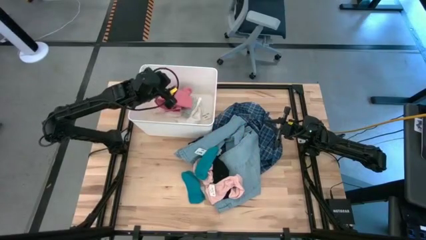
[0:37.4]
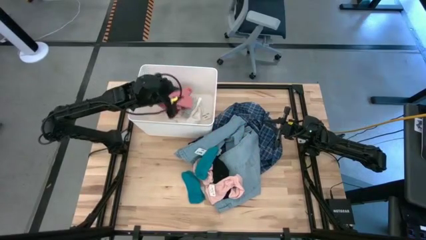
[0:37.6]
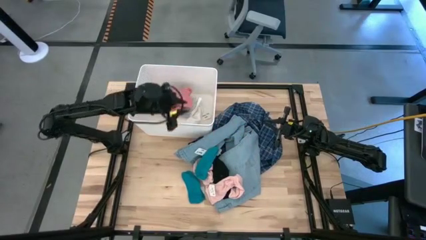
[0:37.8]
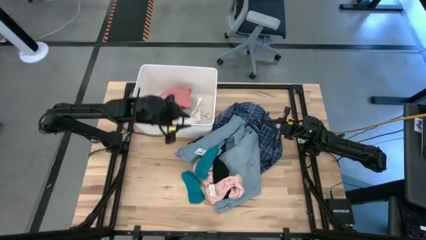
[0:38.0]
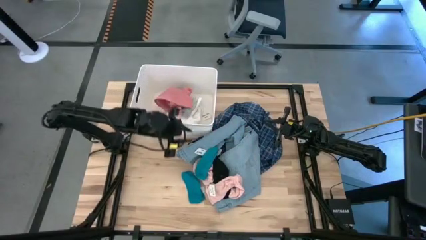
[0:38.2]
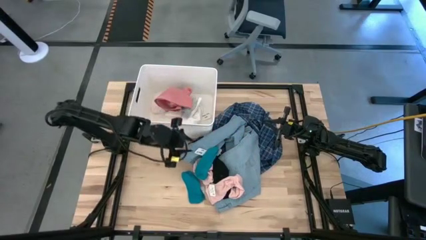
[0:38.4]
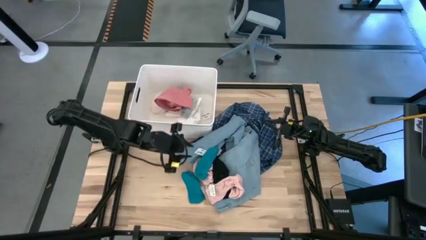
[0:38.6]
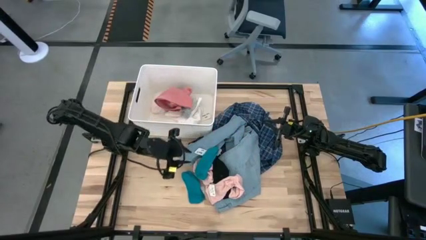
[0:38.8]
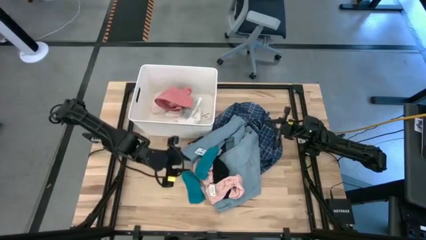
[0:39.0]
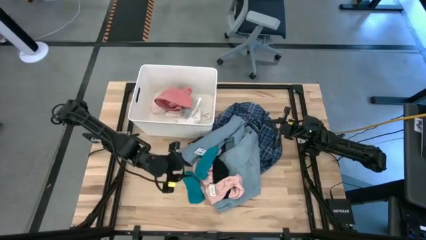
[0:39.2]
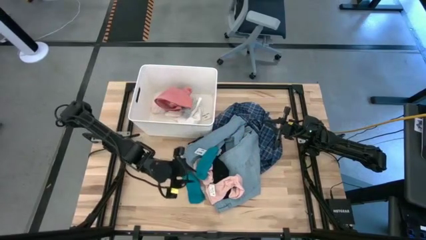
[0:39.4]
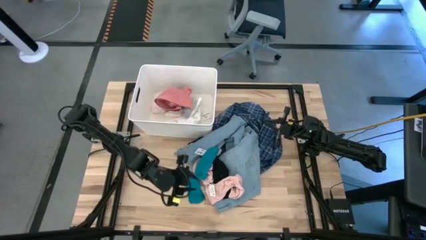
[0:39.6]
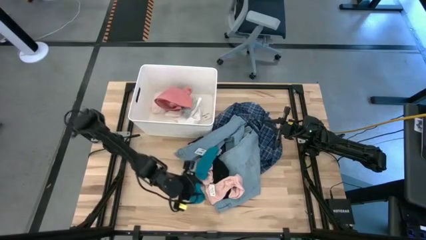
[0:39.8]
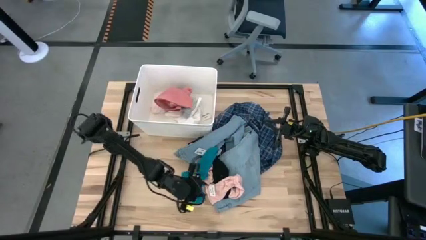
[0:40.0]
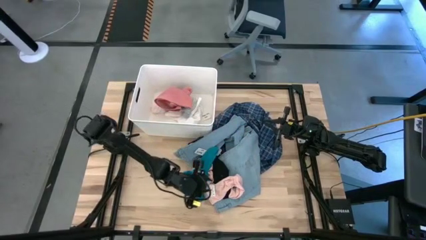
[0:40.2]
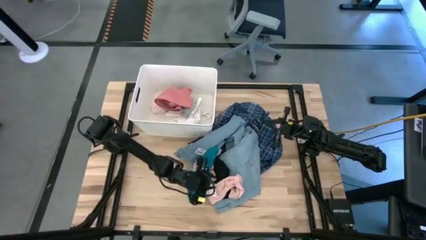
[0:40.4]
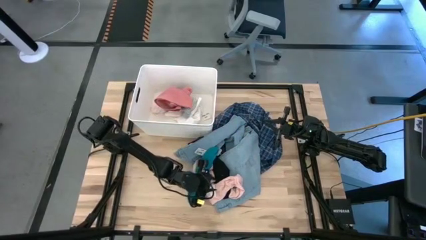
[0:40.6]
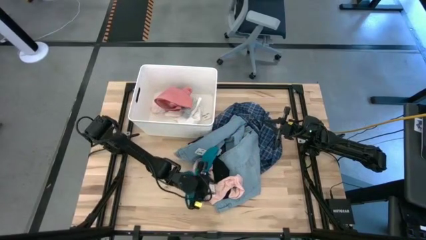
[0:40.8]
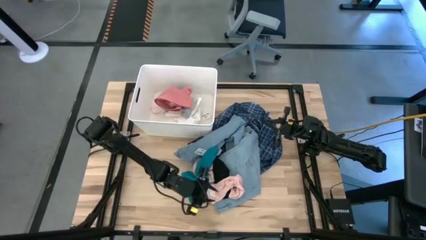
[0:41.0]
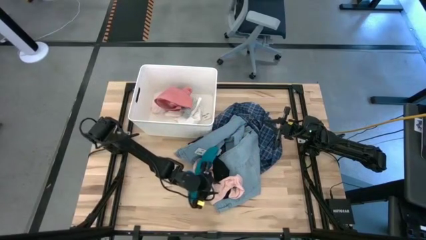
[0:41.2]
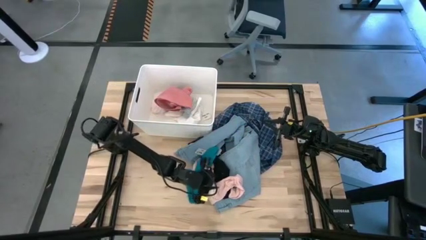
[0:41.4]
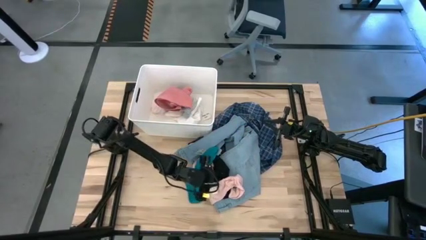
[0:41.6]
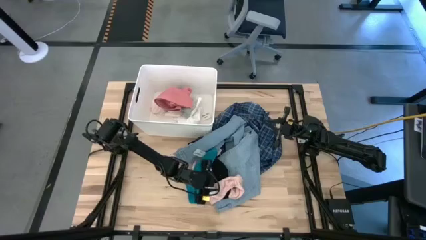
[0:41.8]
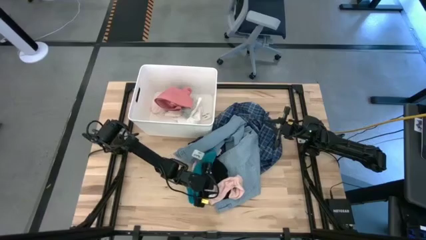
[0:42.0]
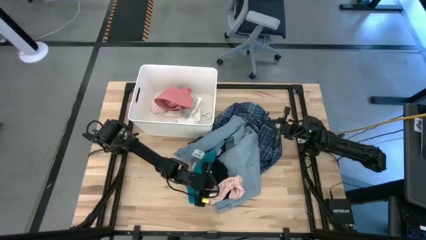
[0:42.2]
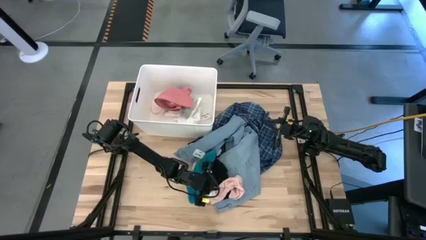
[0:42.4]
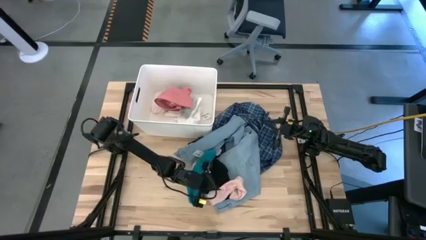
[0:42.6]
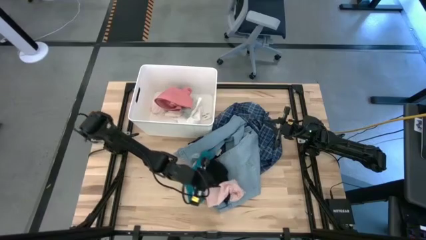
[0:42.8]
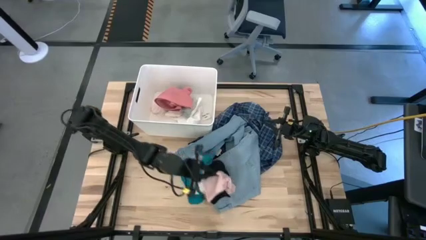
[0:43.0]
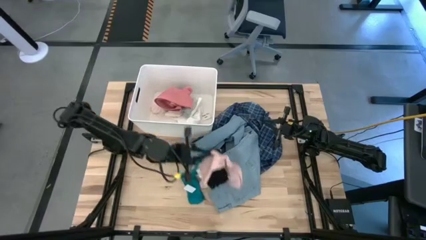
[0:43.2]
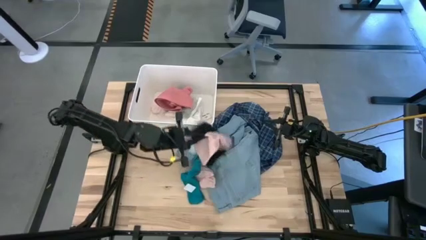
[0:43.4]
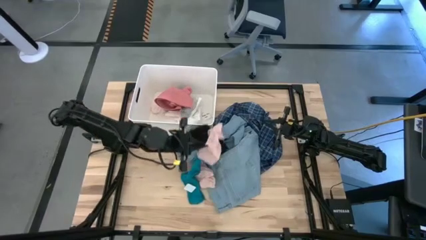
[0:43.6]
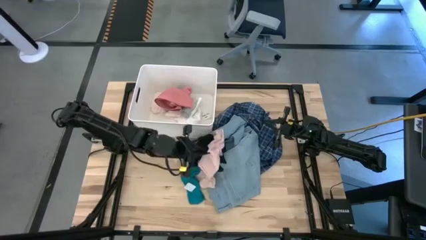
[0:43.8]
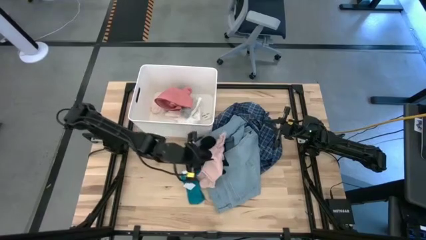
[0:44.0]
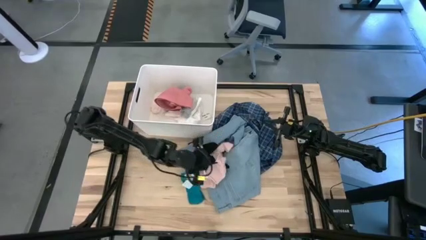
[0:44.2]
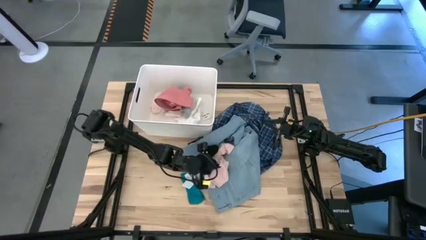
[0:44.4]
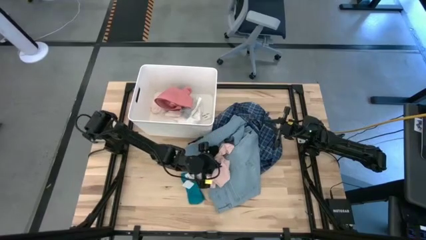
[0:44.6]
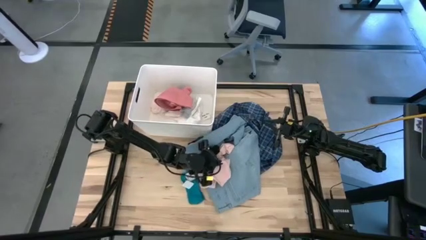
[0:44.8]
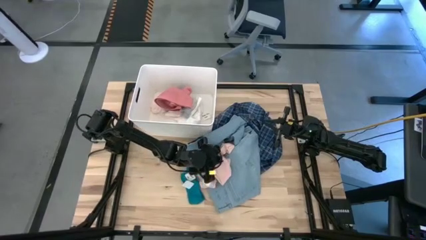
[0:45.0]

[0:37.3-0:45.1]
Task: Sort clothes
Put the light pink sock into the white laundry bin

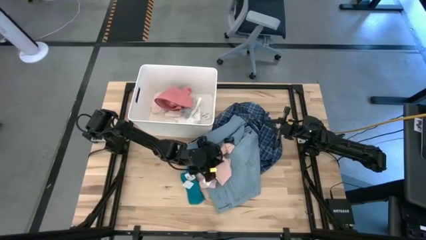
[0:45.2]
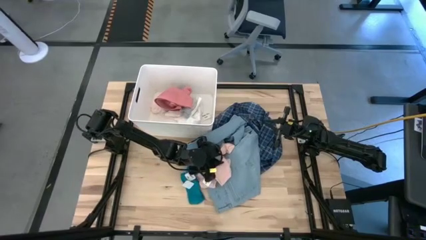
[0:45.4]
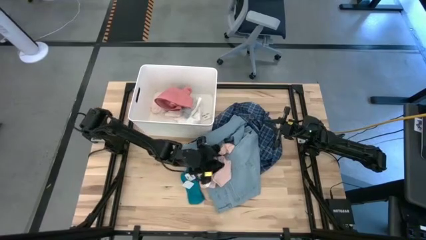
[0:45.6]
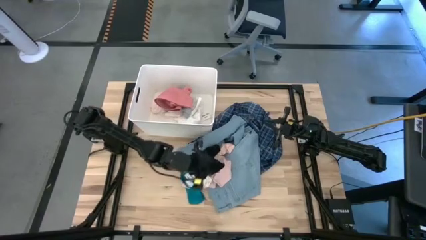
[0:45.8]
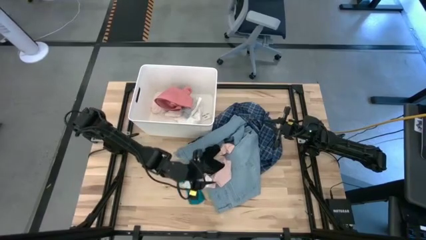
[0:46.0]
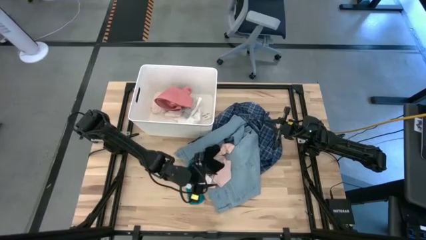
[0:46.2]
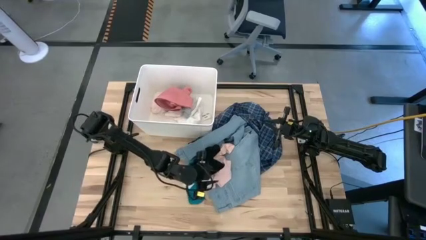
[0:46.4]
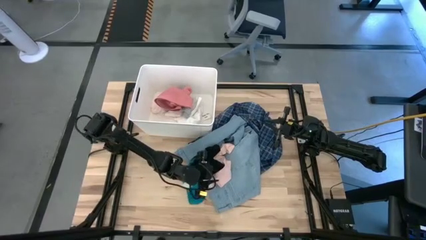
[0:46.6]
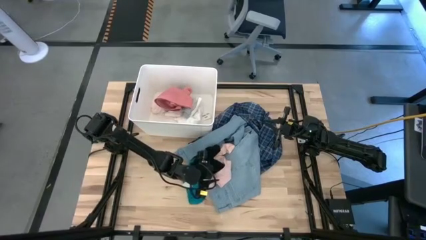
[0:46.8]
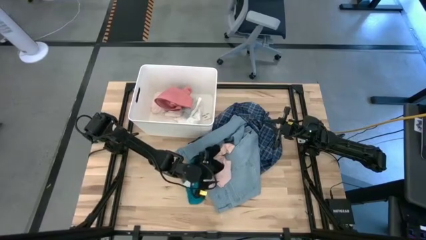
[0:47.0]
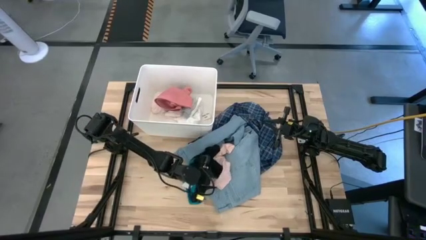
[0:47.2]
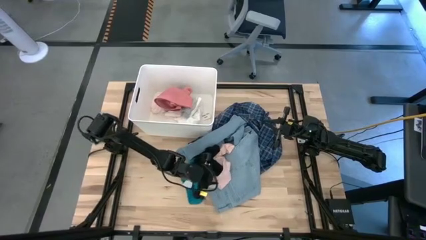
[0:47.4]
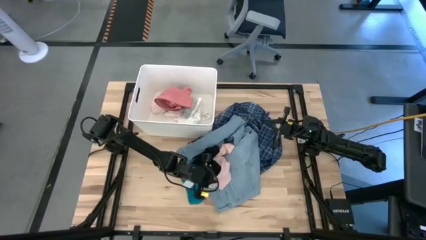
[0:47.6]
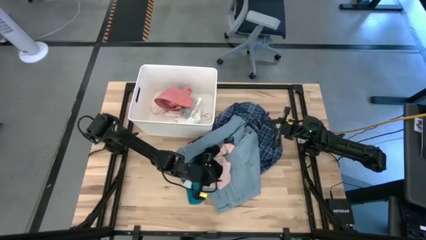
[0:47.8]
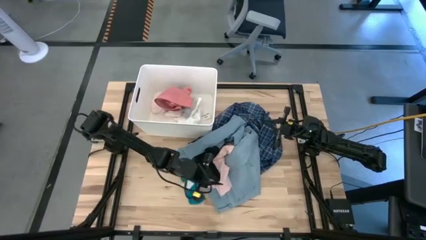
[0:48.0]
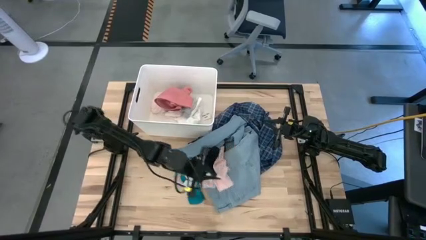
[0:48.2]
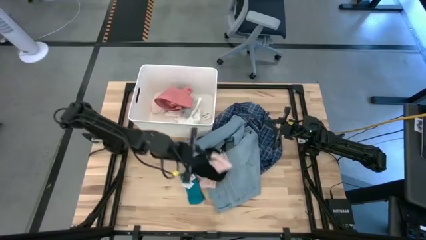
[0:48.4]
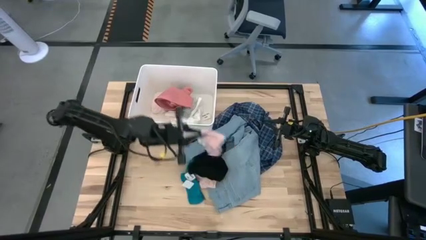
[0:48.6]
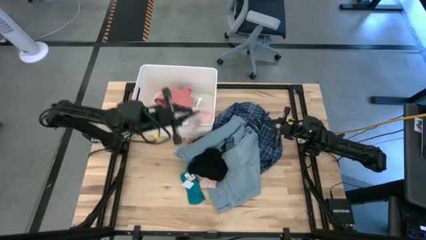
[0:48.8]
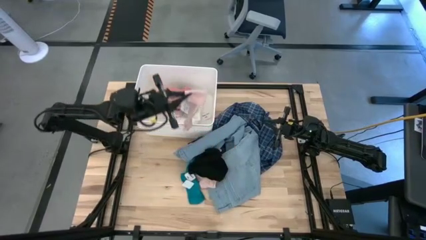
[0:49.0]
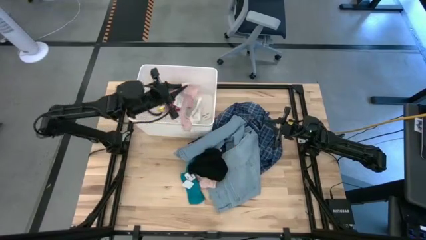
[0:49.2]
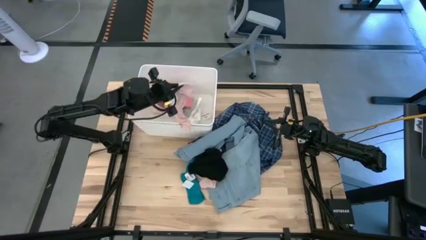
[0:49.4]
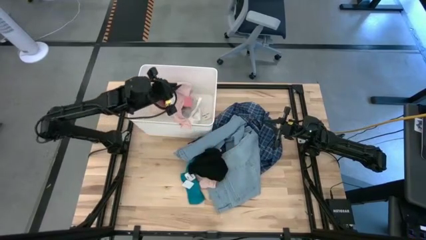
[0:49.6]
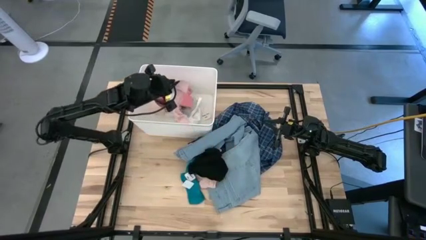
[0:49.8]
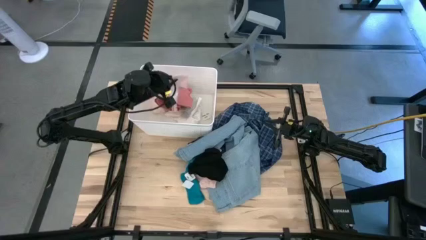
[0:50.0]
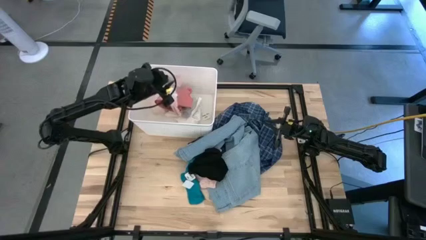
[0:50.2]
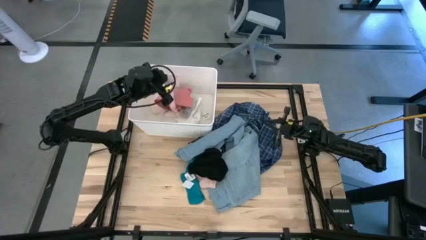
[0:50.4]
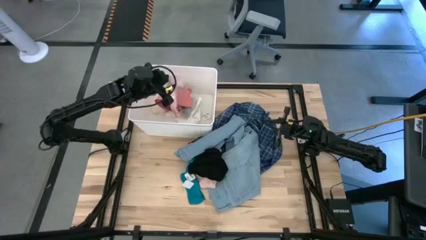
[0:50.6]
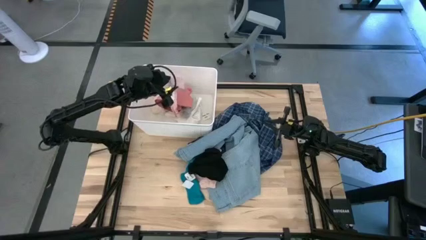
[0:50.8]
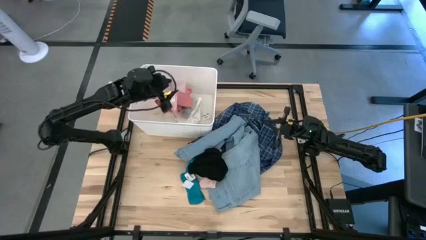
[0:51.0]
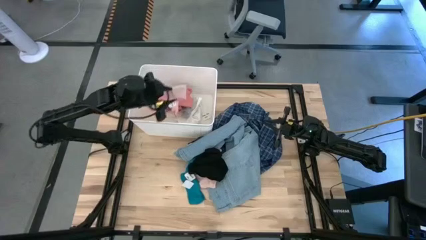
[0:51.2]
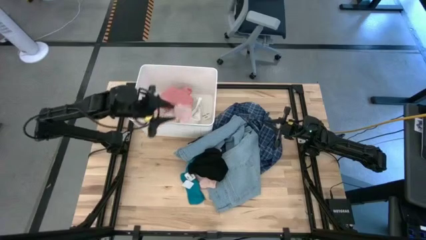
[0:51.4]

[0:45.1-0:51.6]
Put the light pink sock into the white laundry bin

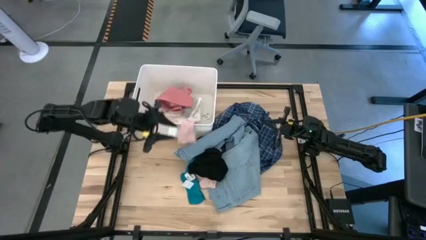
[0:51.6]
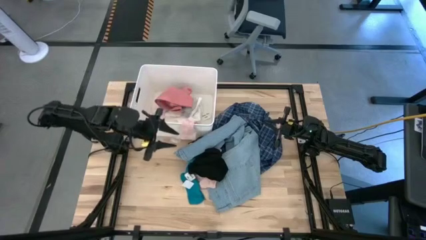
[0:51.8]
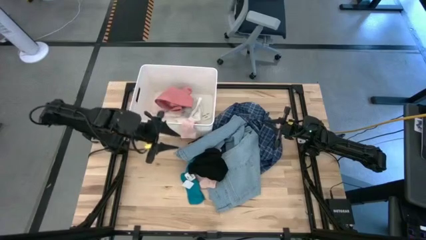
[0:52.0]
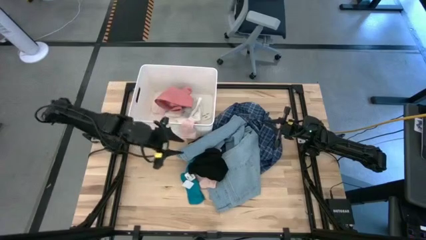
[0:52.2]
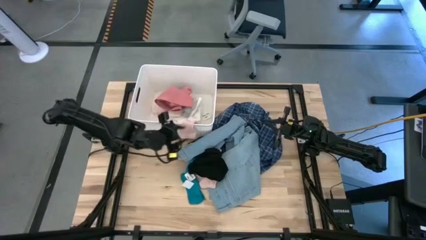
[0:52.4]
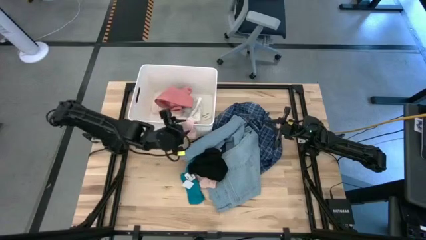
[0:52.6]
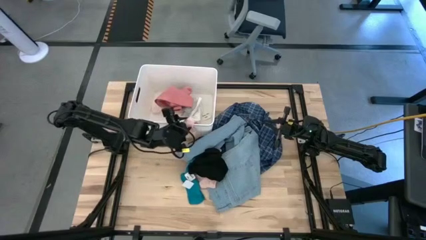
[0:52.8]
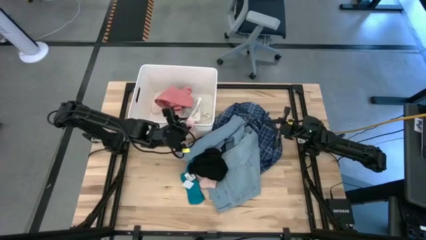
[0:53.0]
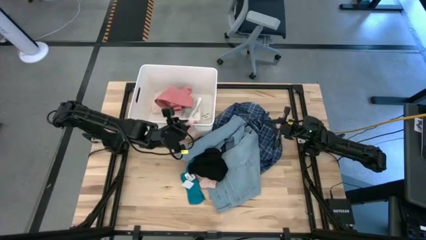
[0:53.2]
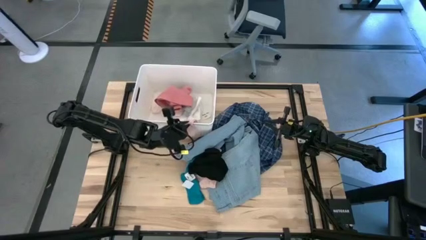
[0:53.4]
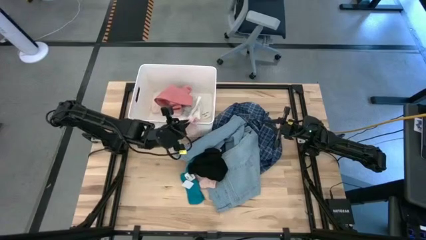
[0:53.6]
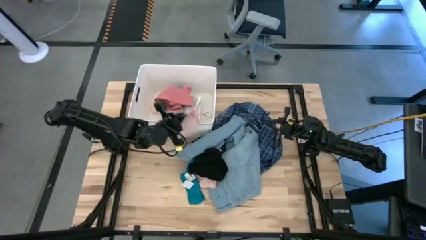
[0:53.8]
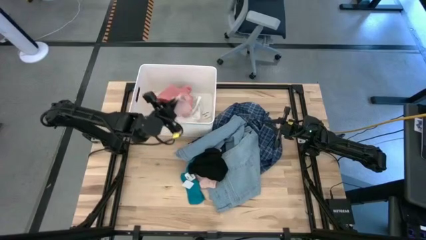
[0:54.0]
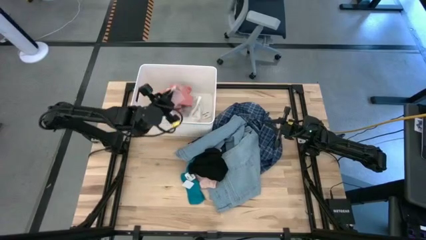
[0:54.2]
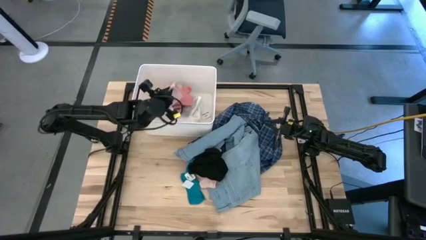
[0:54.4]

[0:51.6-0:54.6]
Put the light pink sock into the white laundry bin
